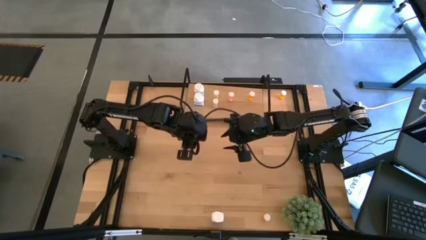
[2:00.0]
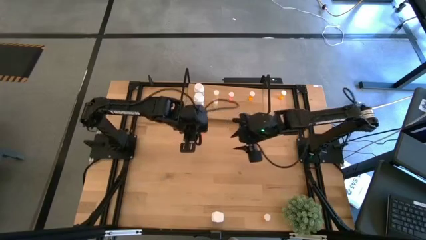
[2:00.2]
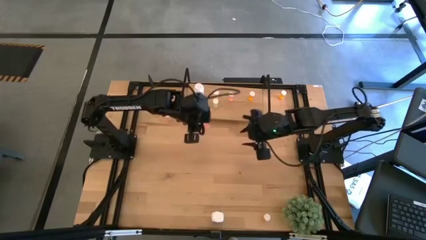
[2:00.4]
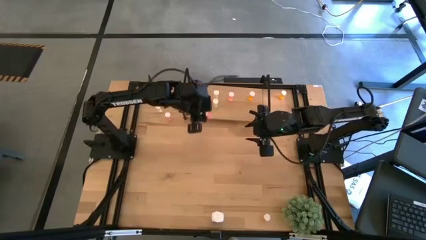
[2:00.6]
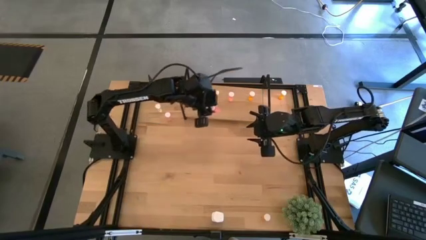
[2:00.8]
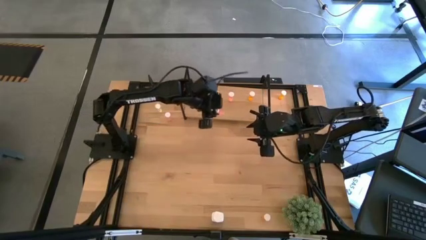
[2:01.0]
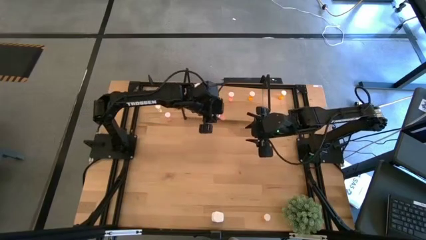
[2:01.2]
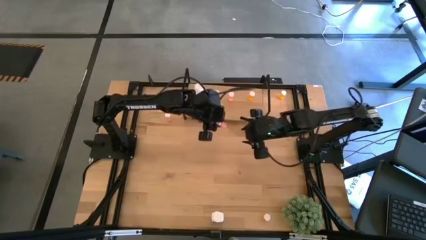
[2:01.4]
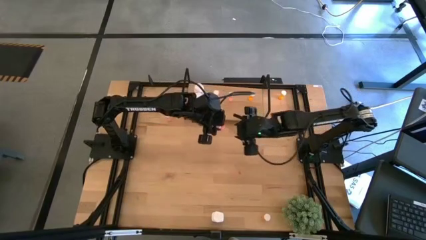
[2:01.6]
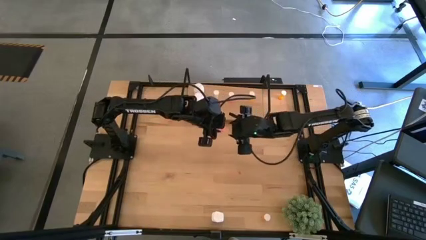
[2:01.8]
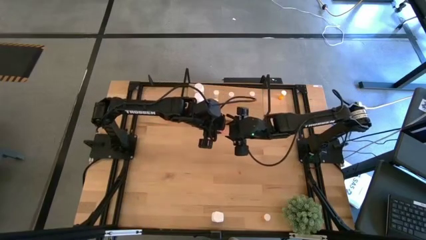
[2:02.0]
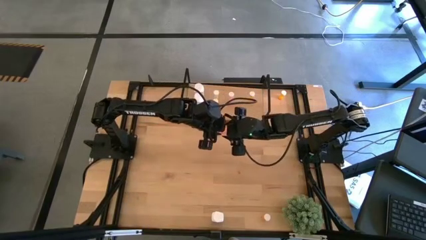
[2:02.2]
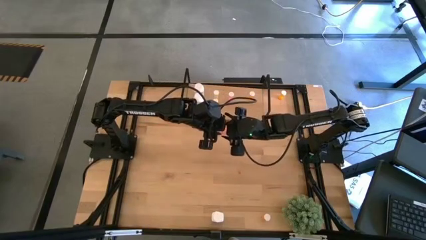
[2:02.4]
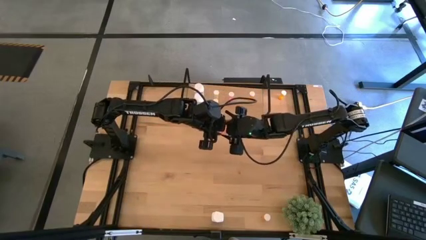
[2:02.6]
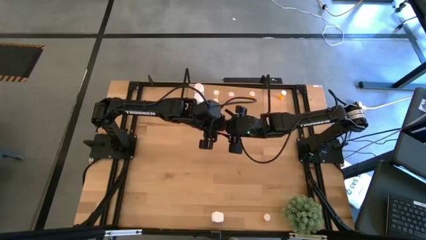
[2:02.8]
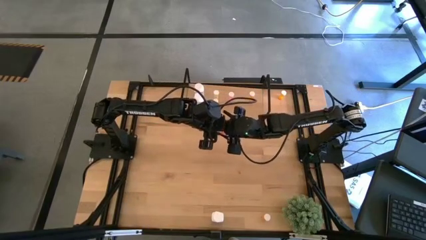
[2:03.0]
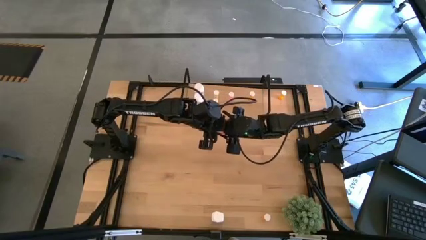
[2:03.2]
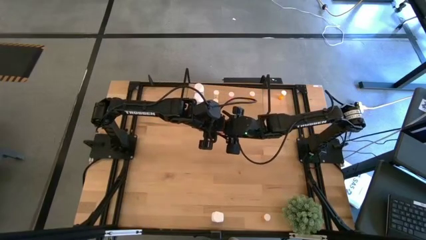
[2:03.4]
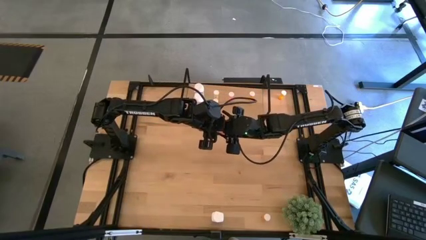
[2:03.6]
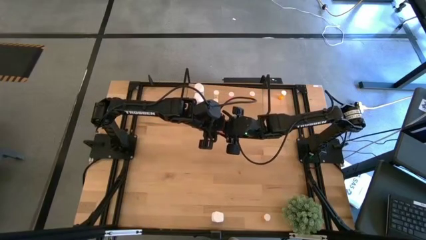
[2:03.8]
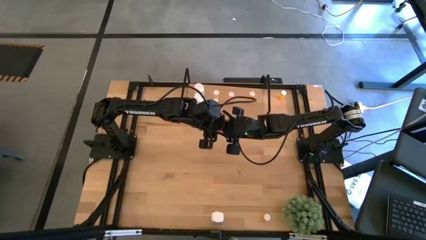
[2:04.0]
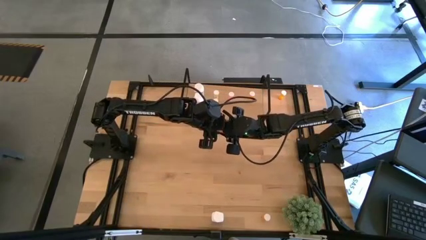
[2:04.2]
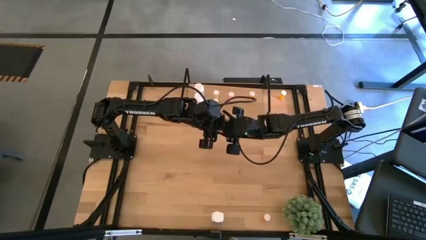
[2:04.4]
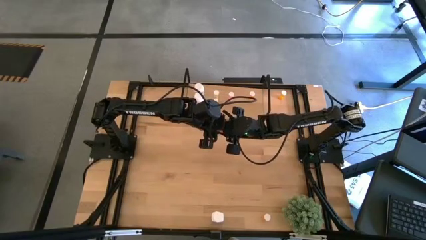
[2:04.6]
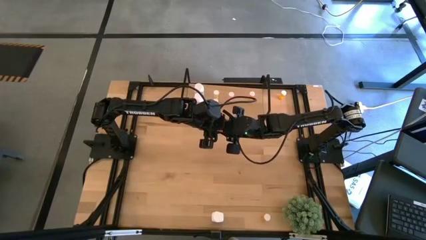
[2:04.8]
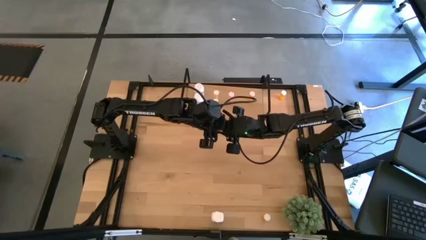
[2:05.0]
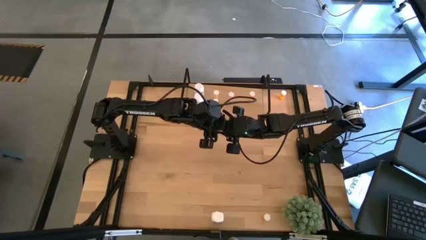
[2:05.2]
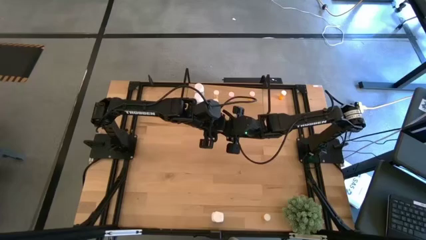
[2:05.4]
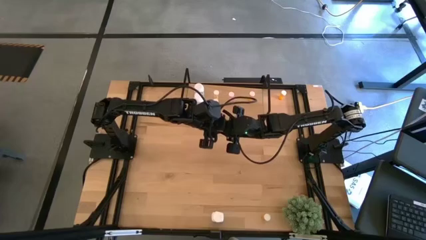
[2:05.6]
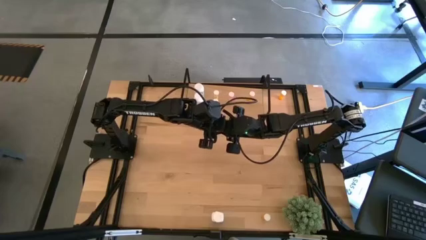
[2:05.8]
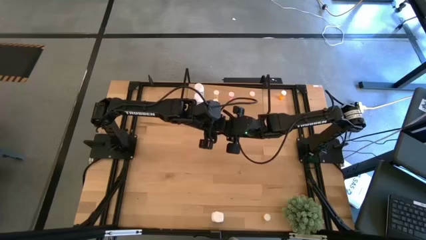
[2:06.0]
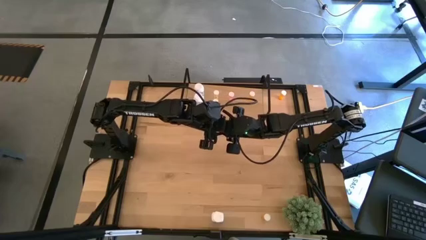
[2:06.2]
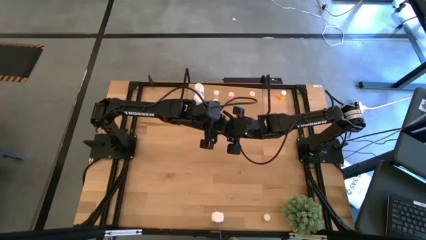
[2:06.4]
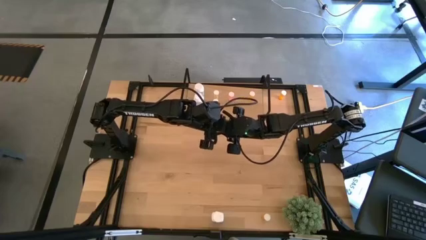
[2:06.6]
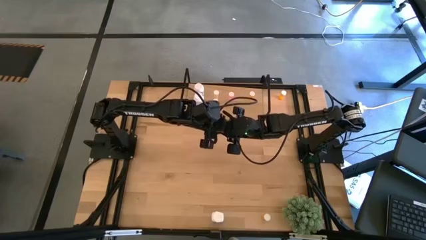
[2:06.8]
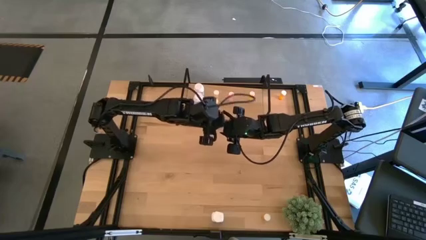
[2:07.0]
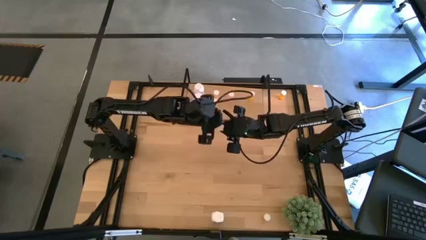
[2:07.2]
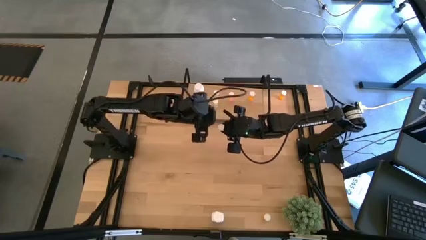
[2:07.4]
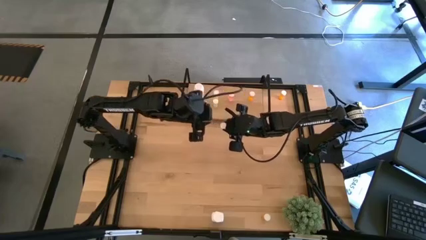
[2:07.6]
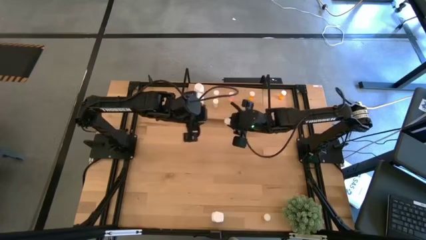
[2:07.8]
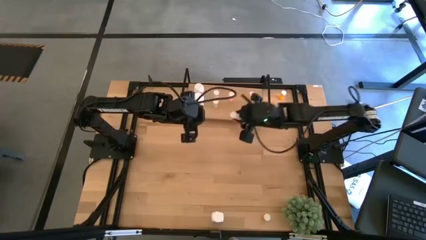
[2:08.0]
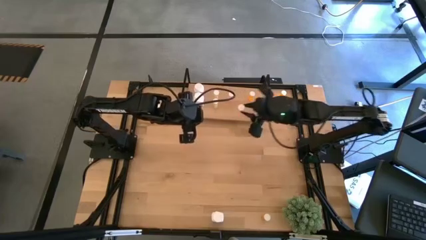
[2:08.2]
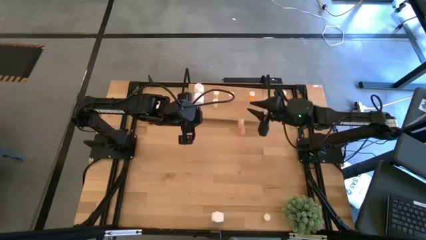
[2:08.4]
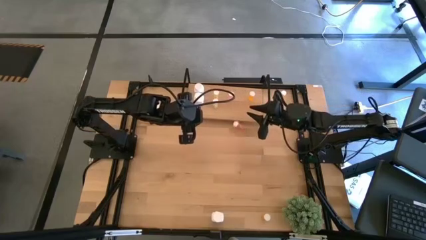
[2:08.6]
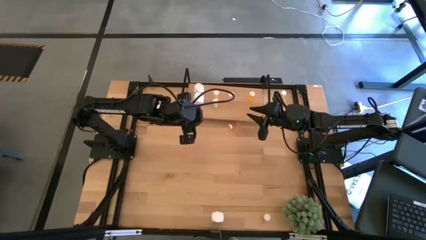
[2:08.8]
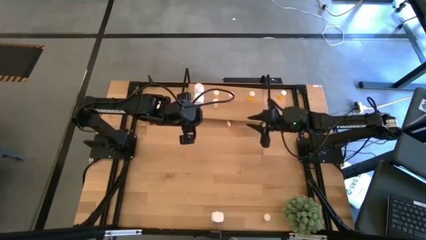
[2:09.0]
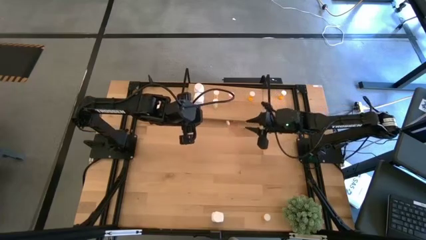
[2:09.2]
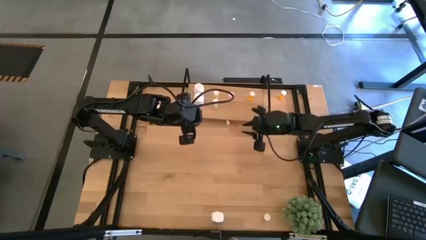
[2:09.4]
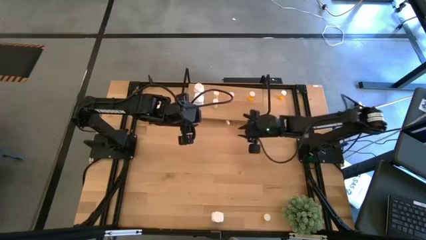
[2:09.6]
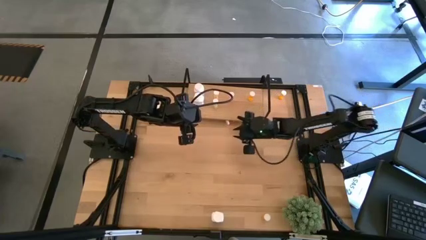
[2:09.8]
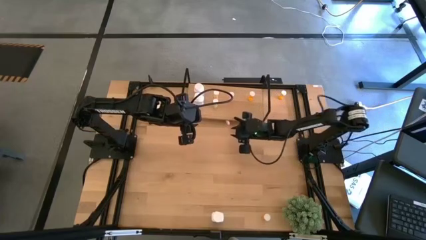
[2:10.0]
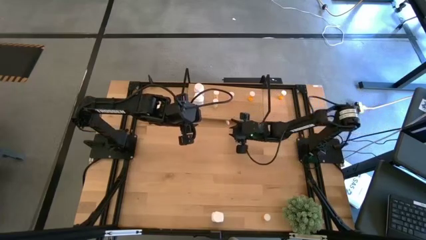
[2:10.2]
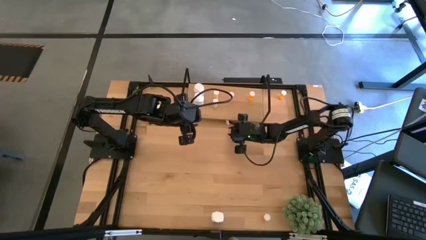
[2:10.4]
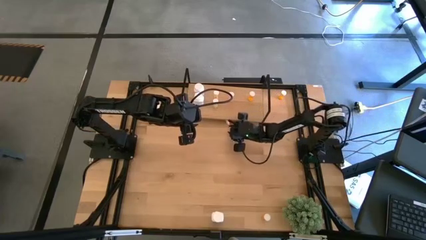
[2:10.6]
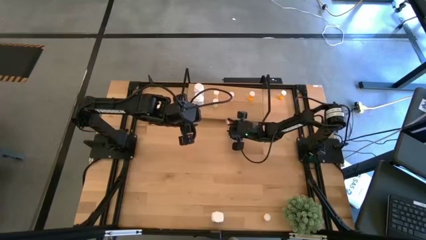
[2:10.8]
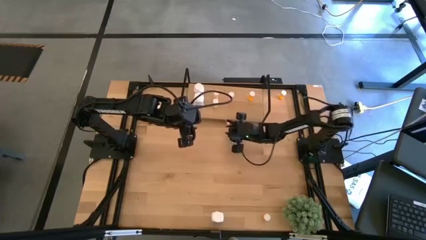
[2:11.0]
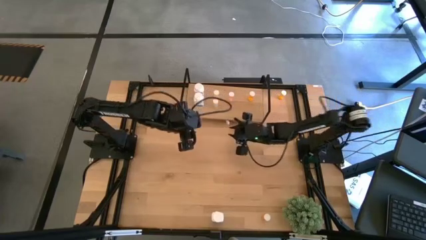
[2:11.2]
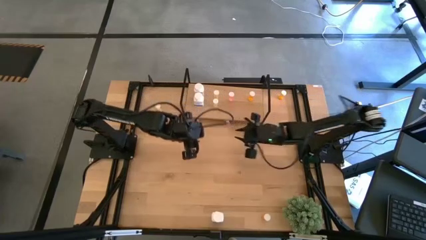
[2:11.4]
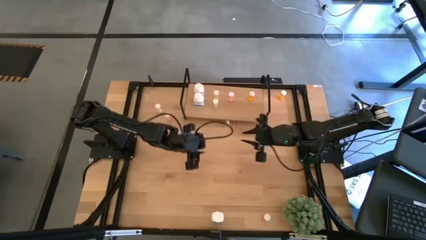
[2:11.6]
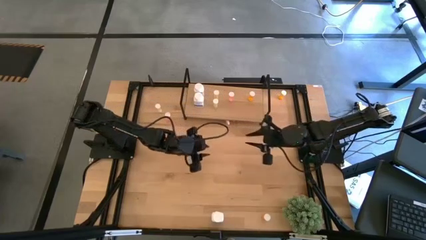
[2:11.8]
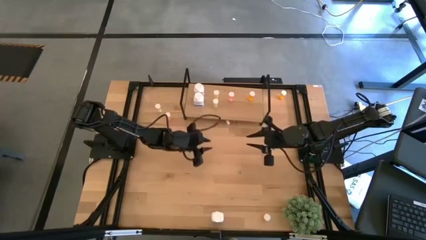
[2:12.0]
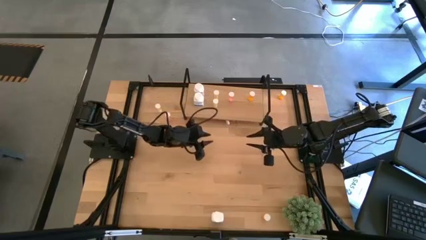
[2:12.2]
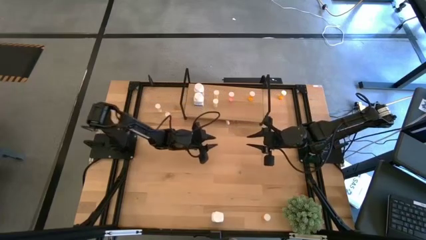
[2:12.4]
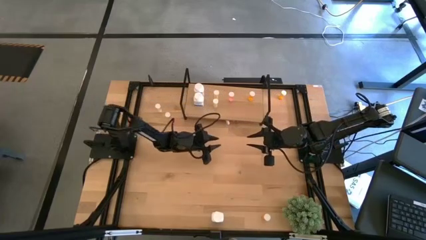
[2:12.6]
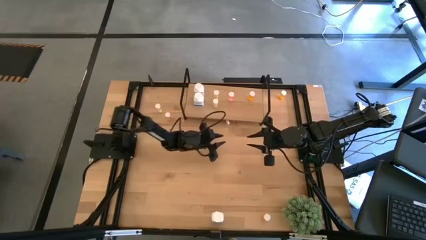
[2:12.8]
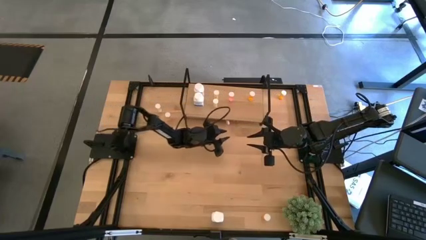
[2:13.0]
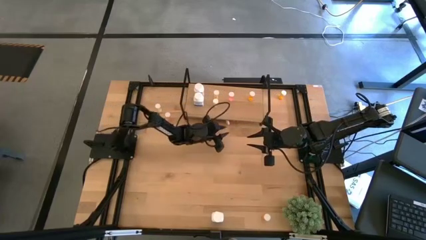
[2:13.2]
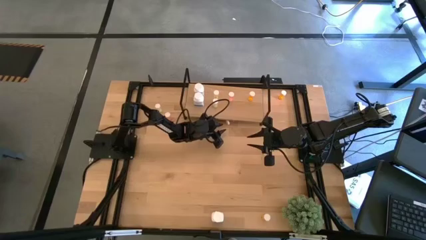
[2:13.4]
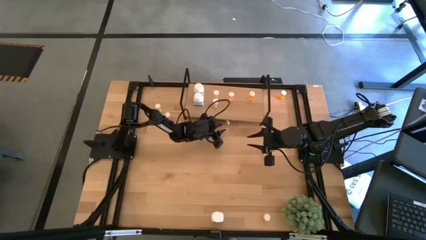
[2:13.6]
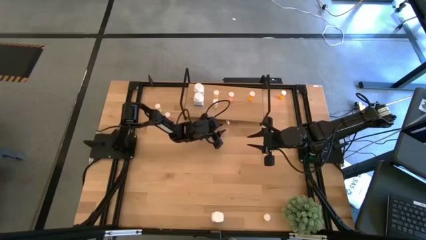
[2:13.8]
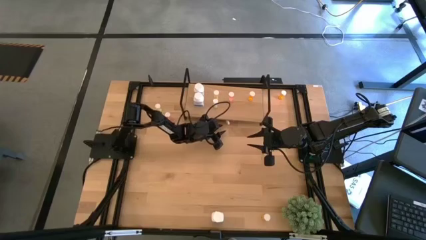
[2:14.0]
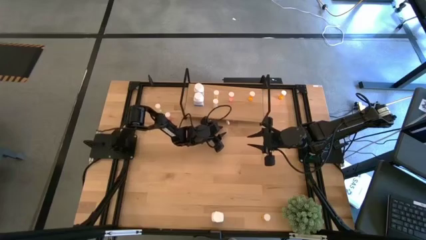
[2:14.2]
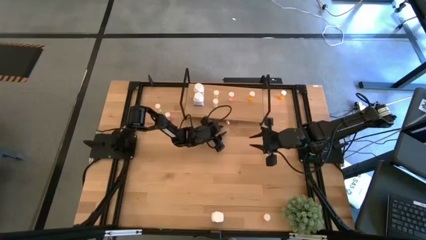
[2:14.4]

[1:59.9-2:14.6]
Task: Pick and place medicine bottles onto shelf by color
Put the bottom red pill bottle on the shelf aligned with the other red pill bottle
